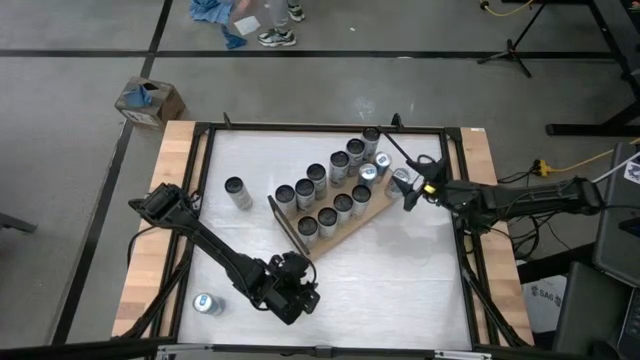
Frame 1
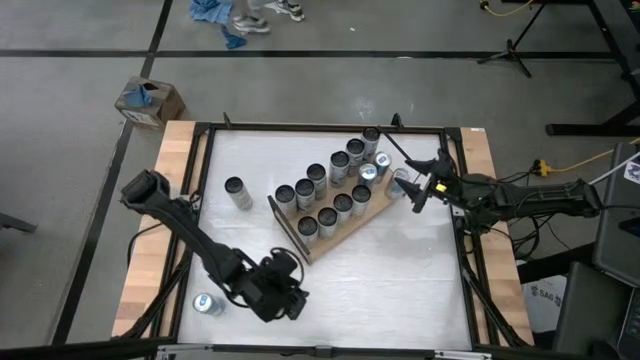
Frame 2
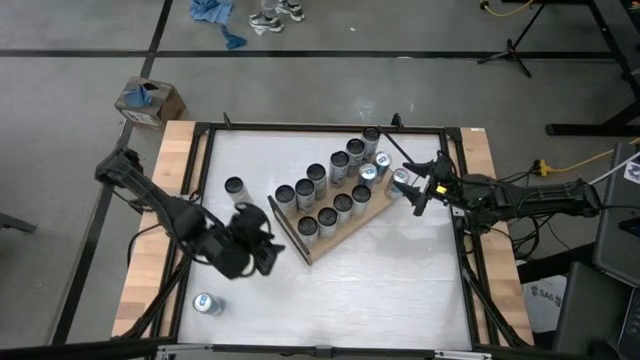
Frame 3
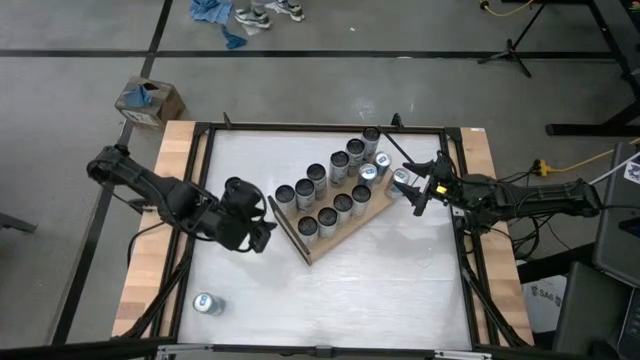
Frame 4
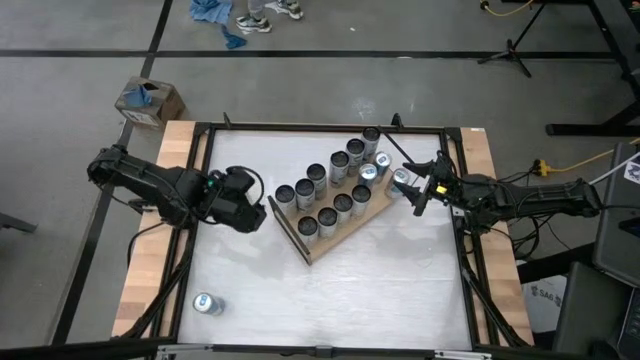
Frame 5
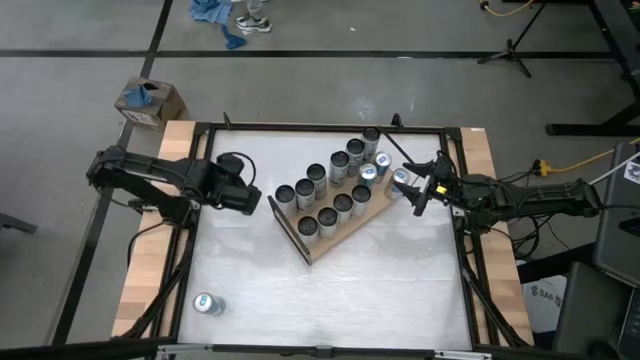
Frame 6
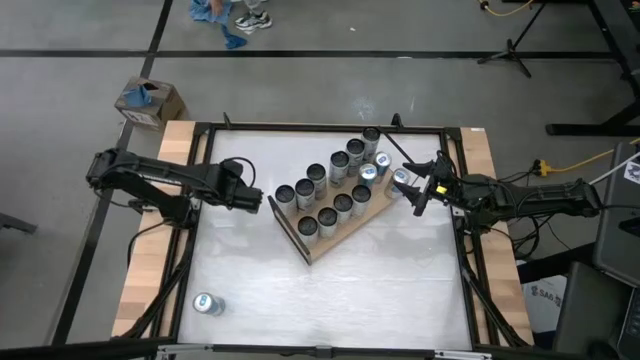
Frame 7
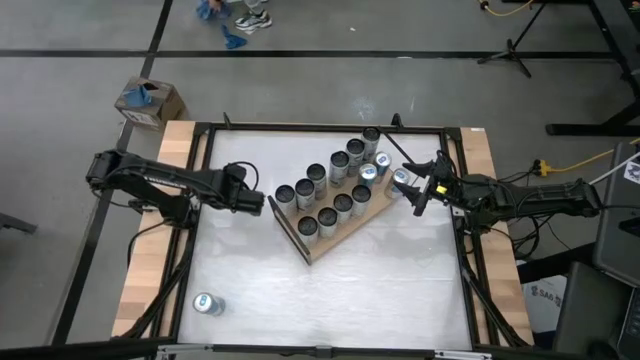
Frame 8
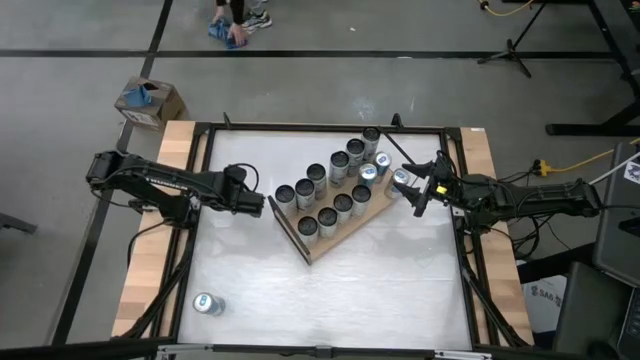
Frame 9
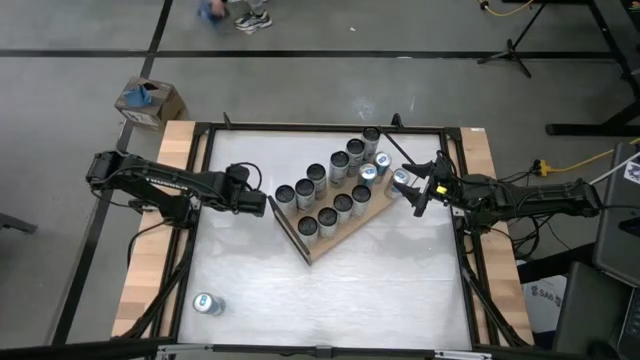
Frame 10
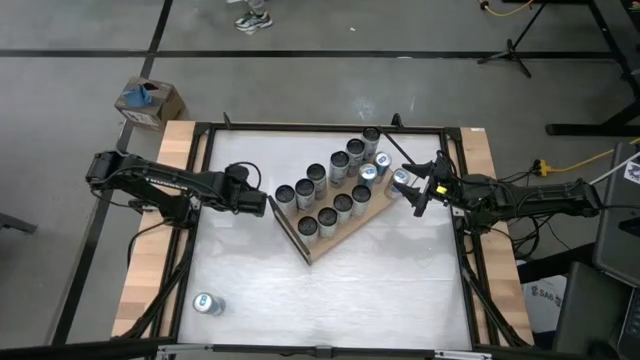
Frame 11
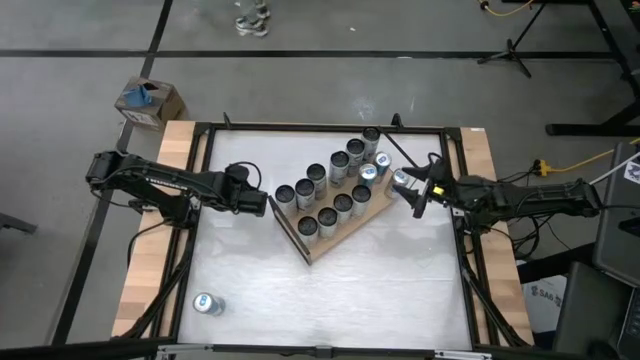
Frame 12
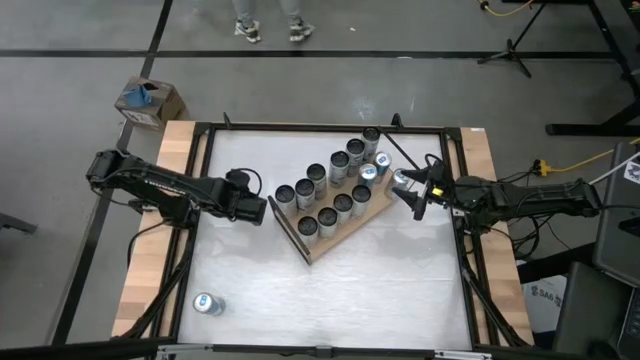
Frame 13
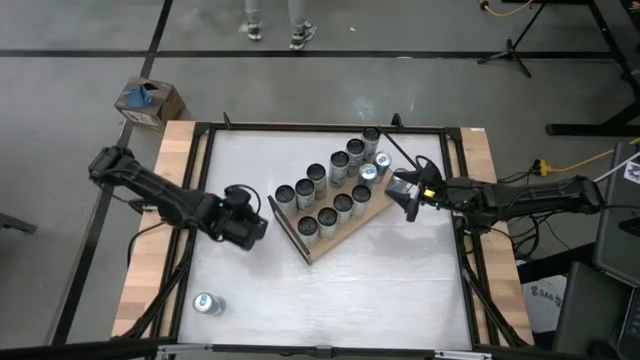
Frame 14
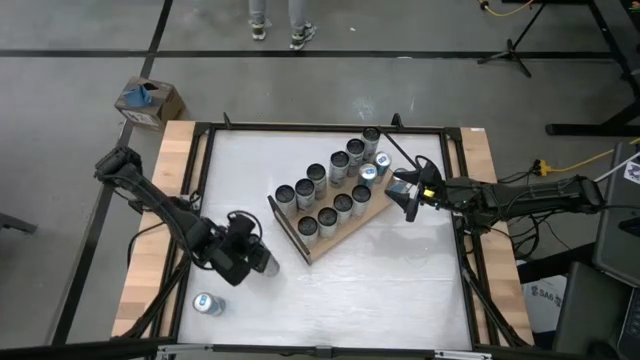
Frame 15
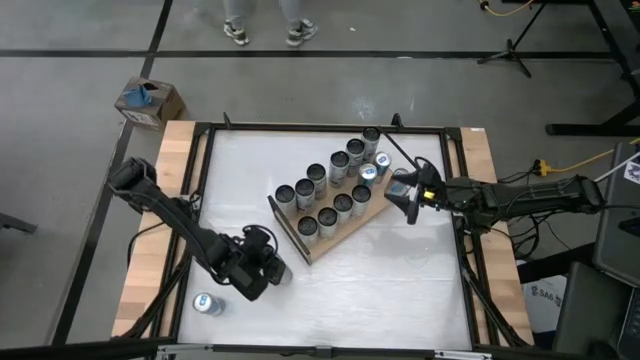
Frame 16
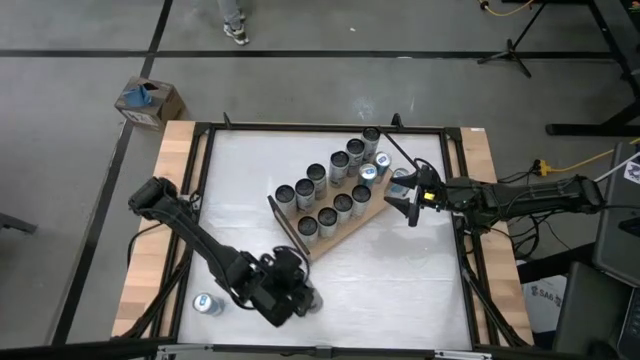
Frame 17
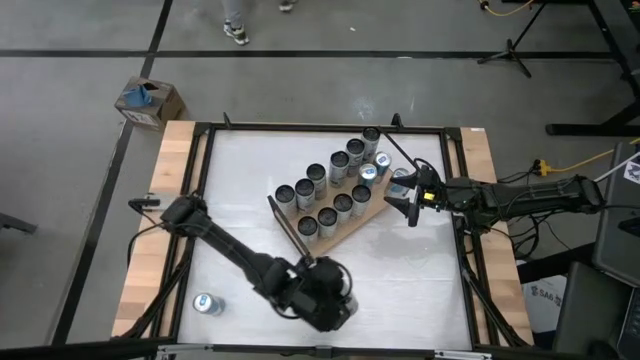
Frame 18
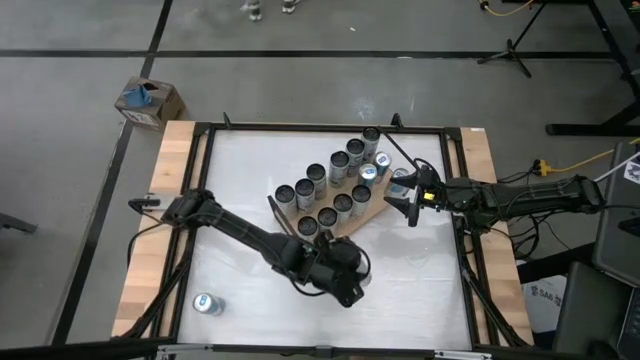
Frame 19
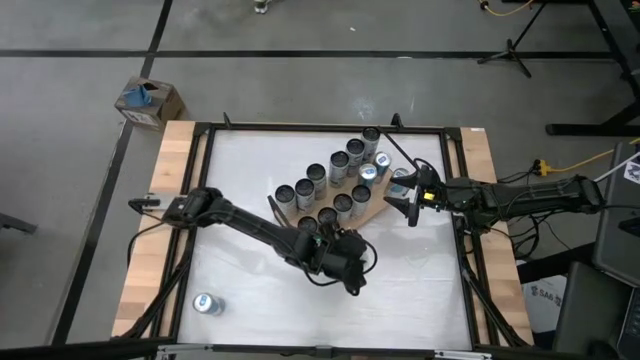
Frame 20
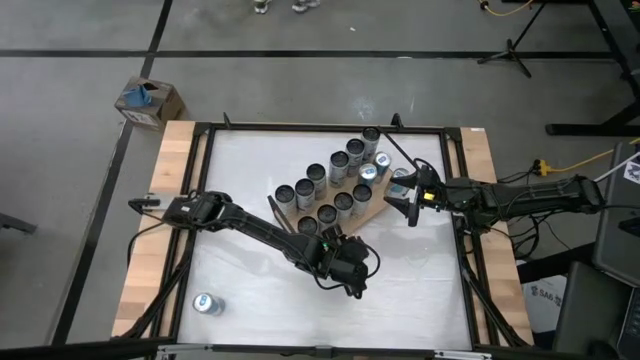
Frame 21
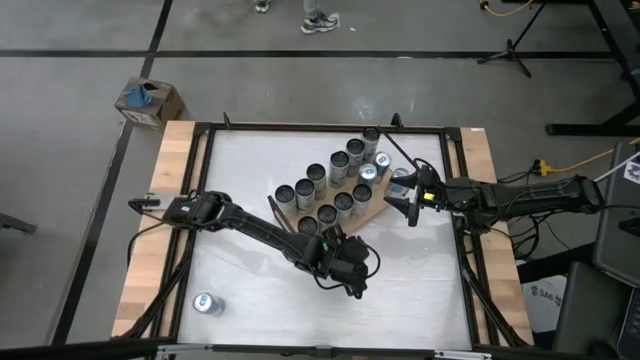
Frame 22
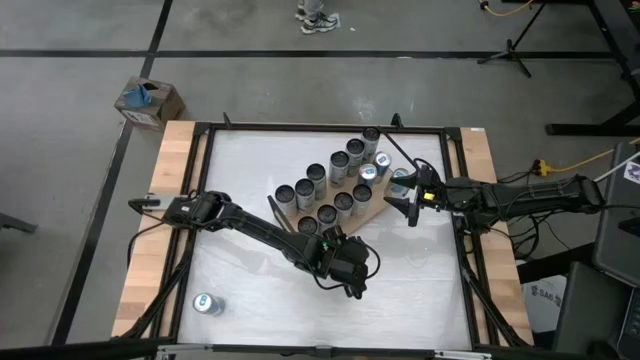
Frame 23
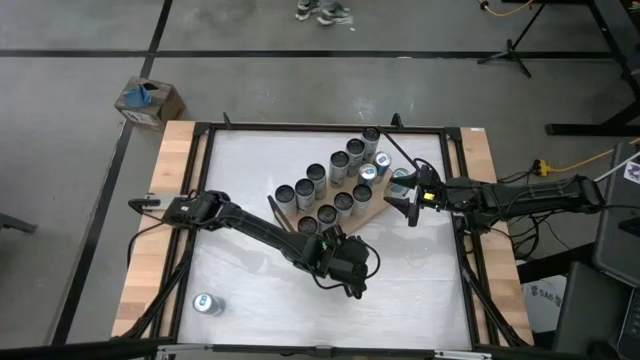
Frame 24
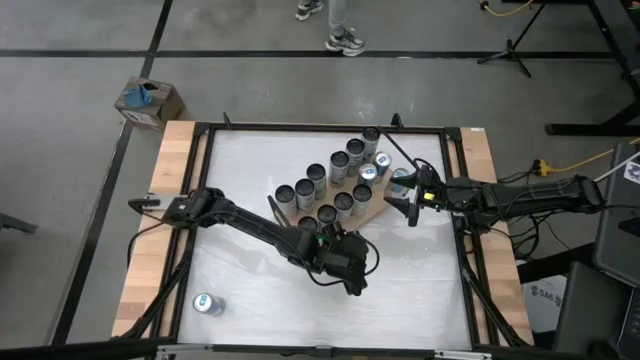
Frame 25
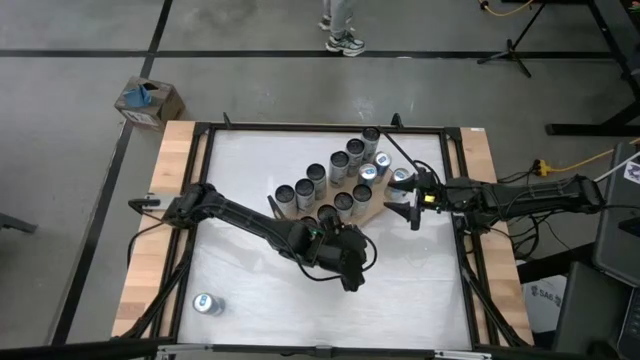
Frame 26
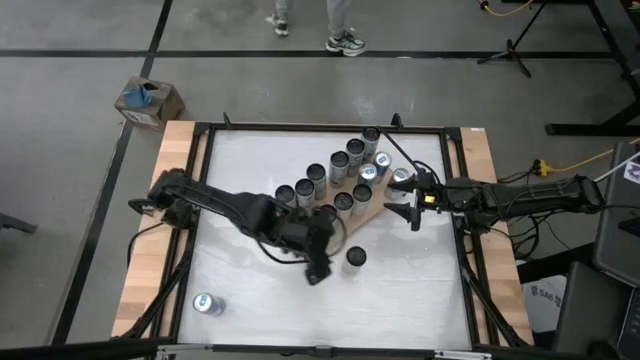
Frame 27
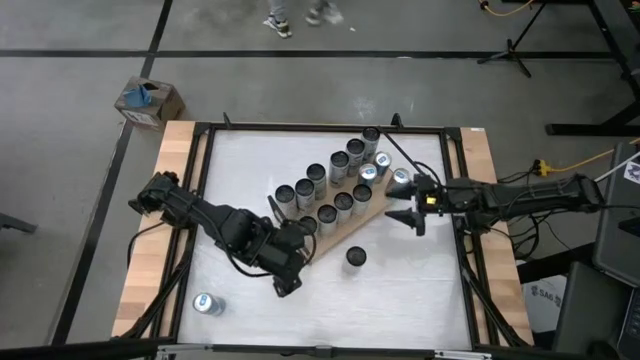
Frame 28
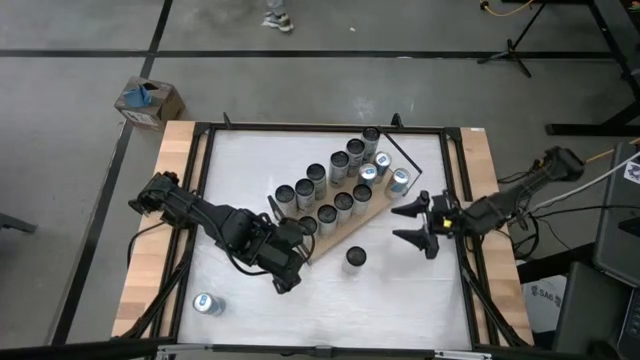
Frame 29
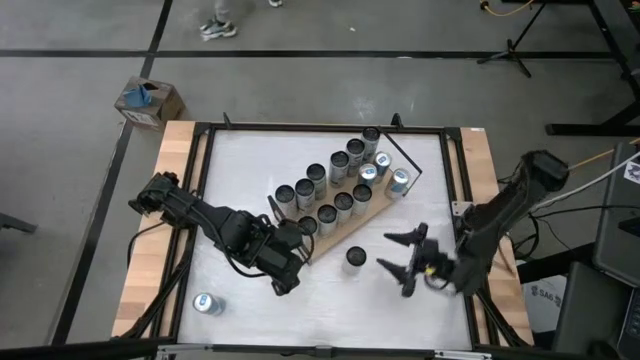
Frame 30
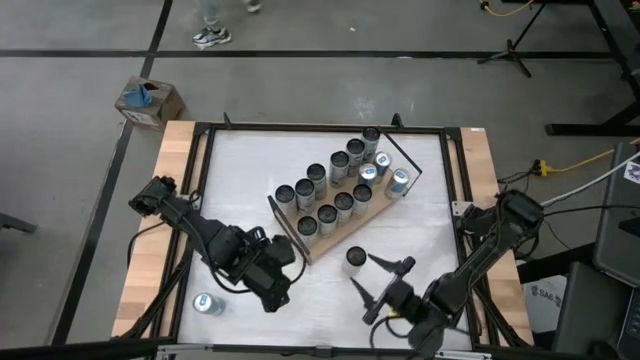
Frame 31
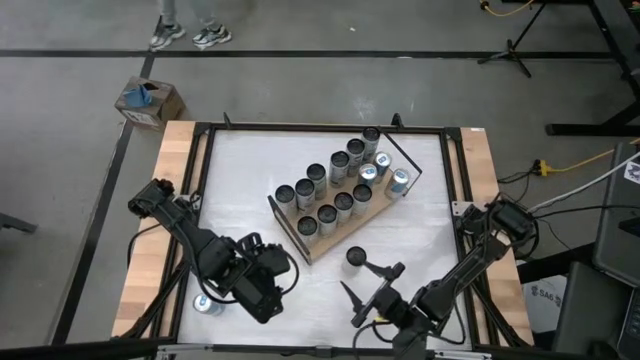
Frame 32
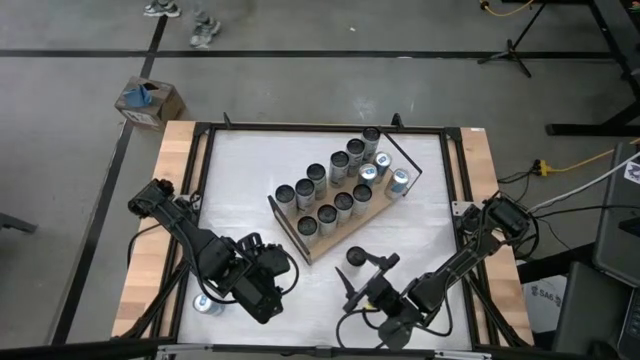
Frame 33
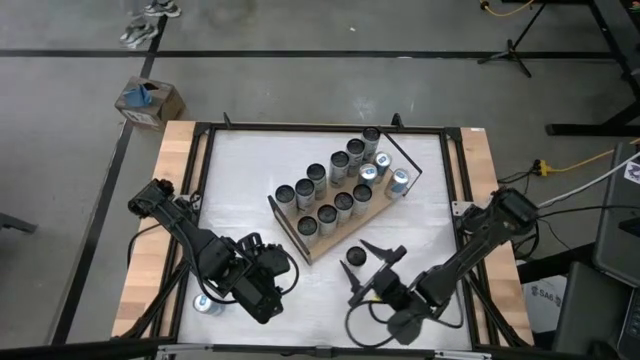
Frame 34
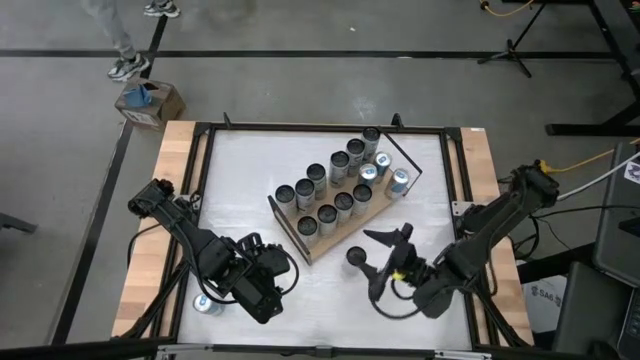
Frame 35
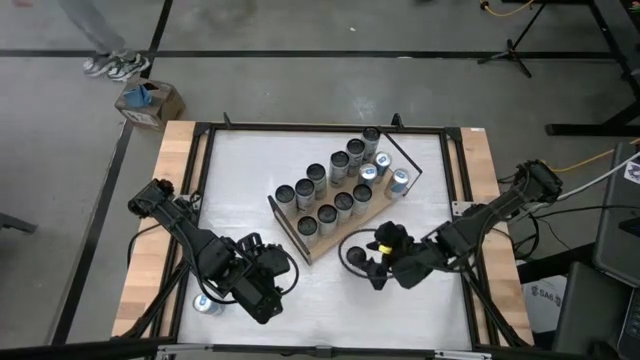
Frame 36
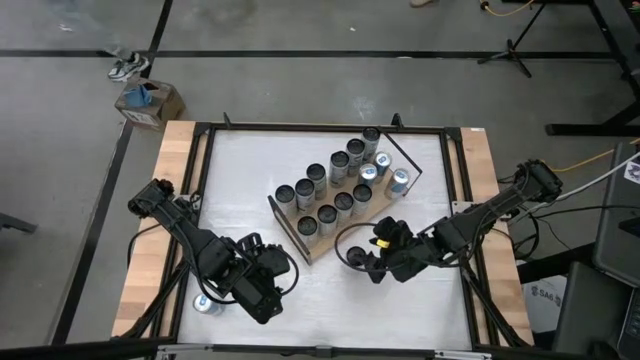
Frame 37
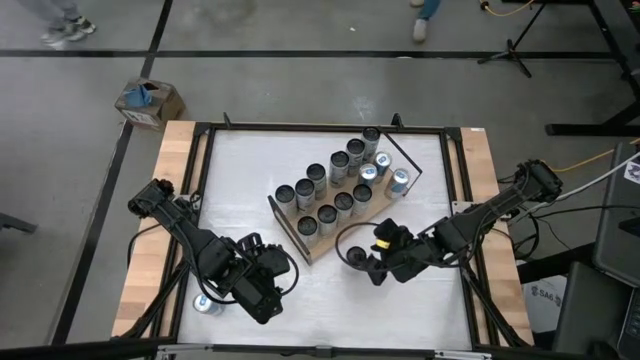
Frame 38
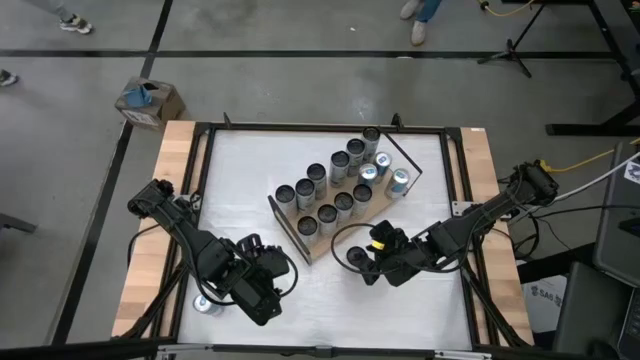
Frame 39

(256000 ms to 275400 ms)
Task: Place canned beverage on shelf
Put the white yellow soda can on the shelf

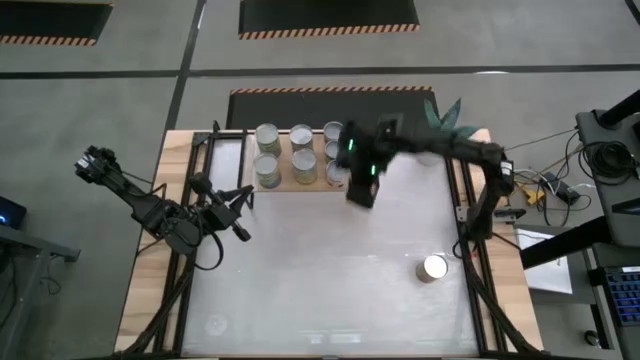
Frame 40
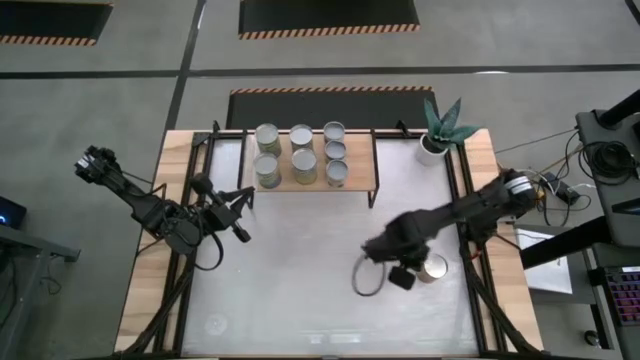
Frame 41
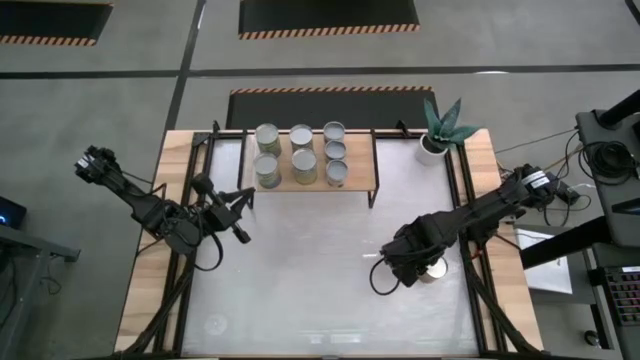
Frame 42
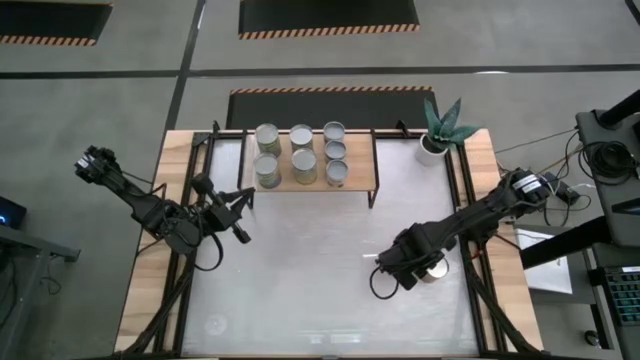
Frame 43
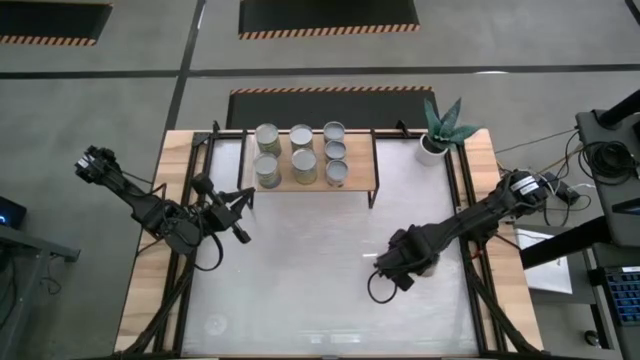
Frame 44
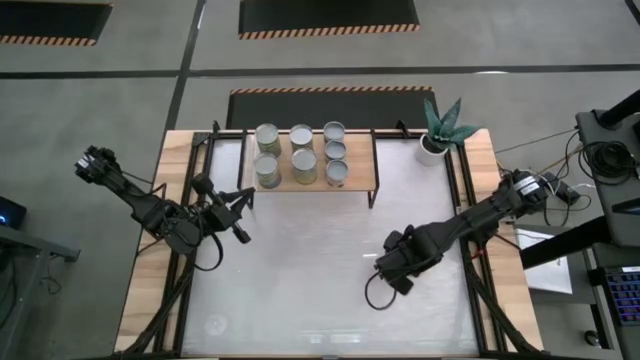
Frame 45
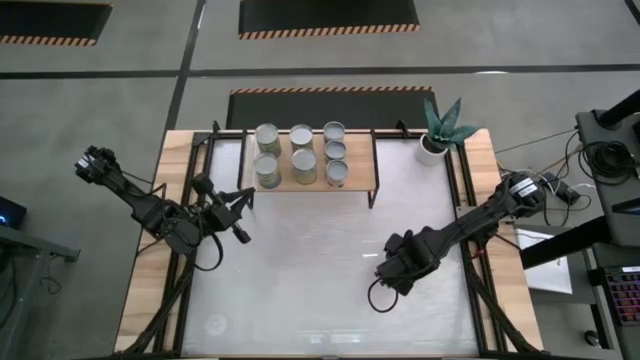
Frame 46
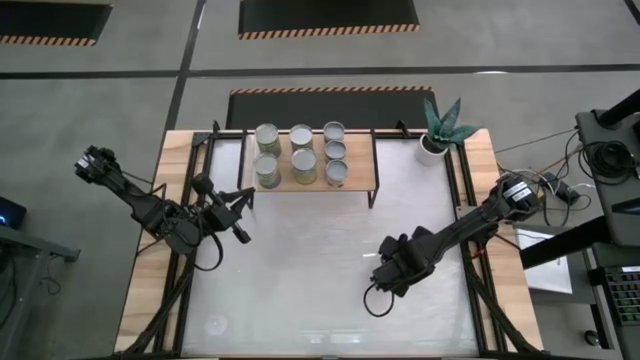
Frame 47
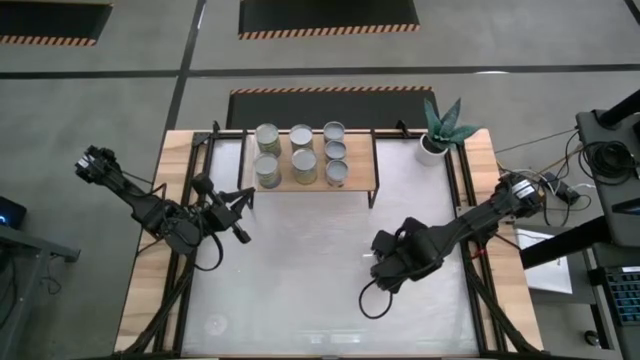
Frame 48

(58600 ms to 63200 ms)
Task: Pick and place cans onto a shelf
Put the canned pineapple on the shelf
